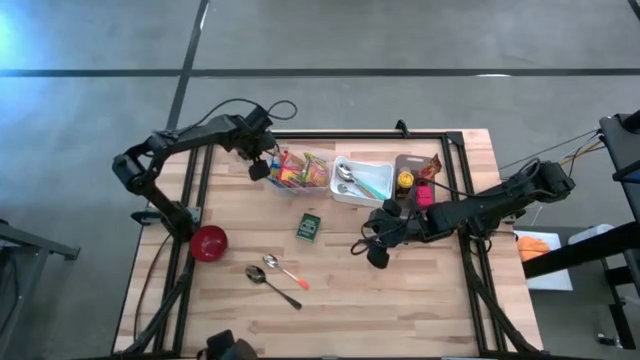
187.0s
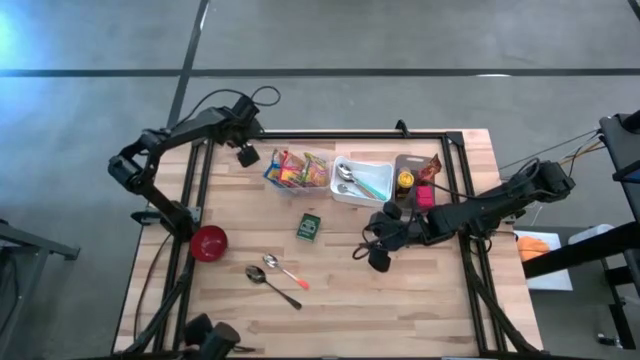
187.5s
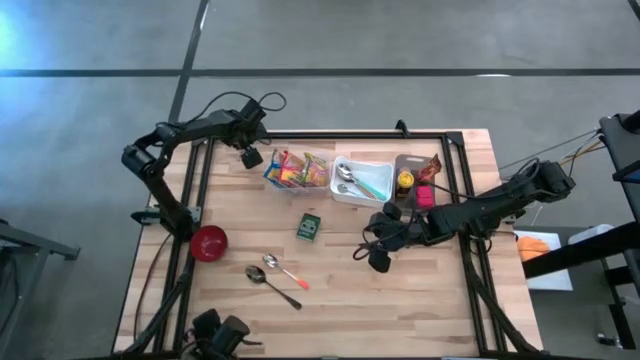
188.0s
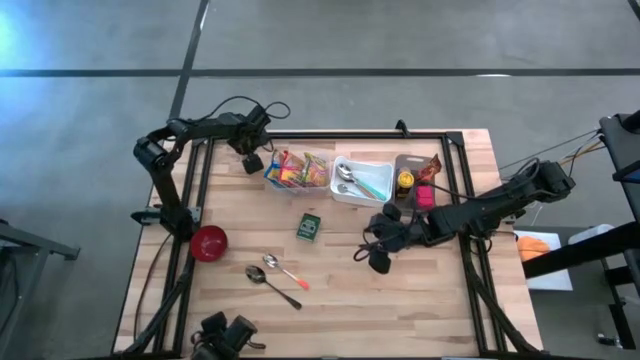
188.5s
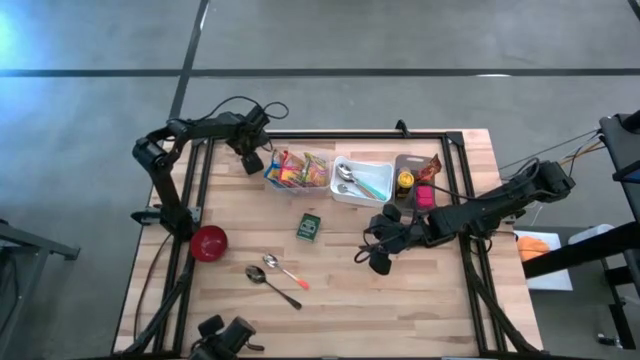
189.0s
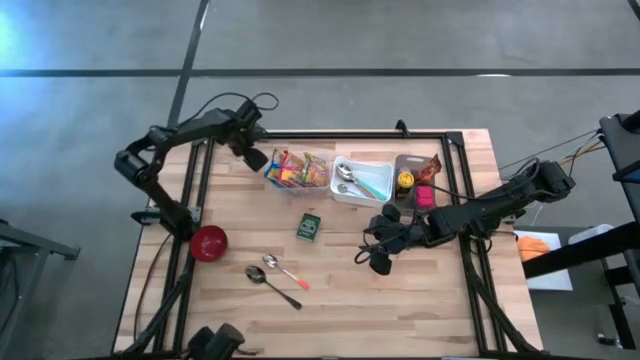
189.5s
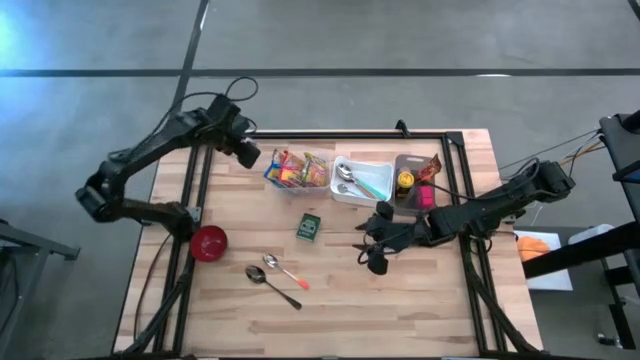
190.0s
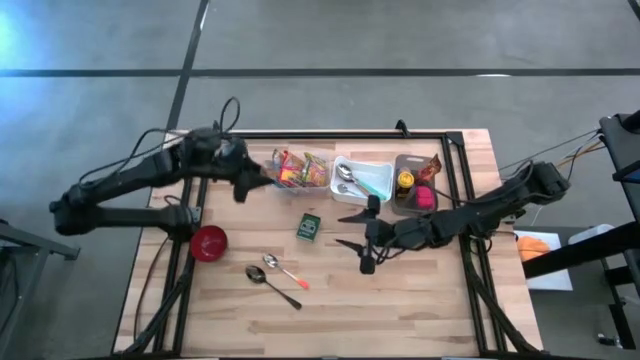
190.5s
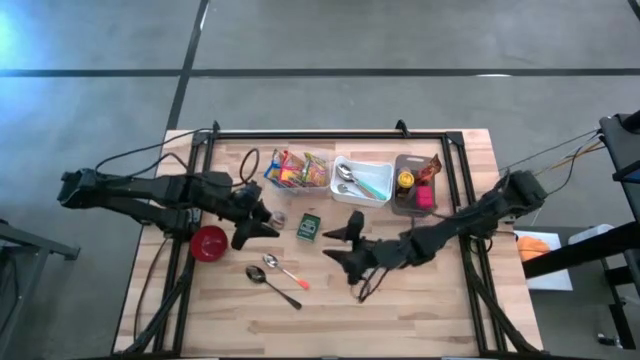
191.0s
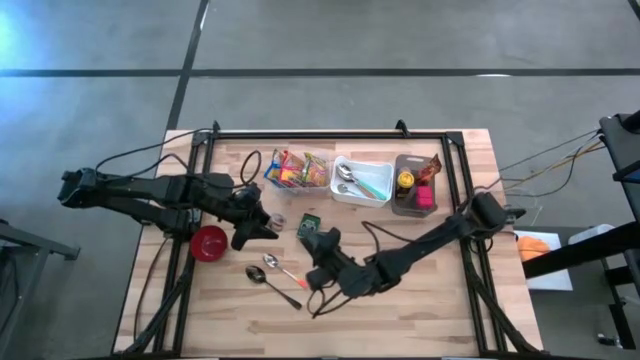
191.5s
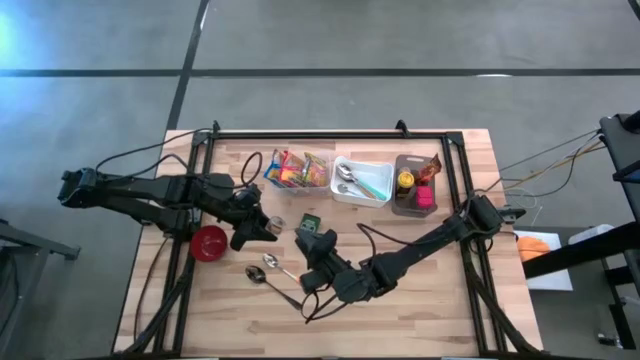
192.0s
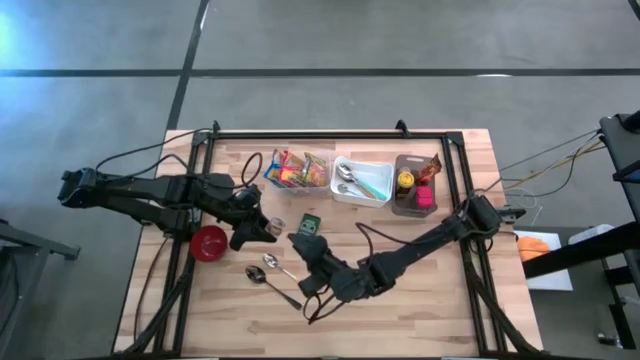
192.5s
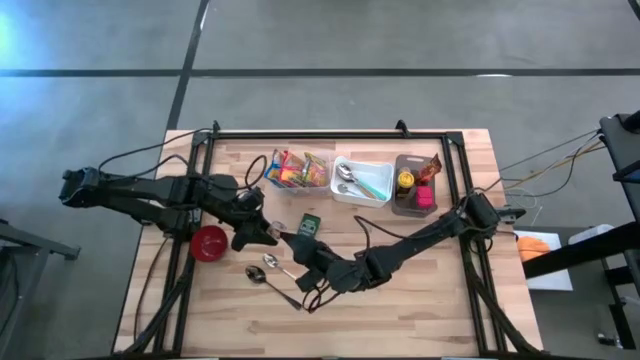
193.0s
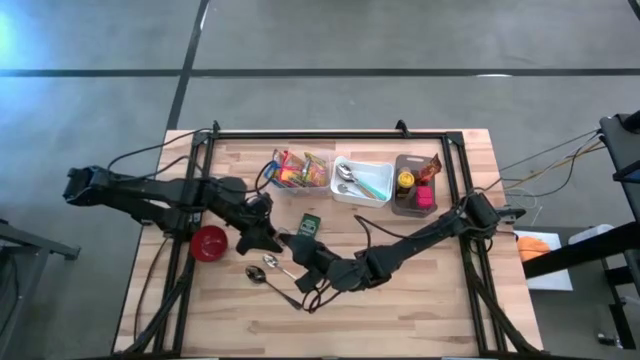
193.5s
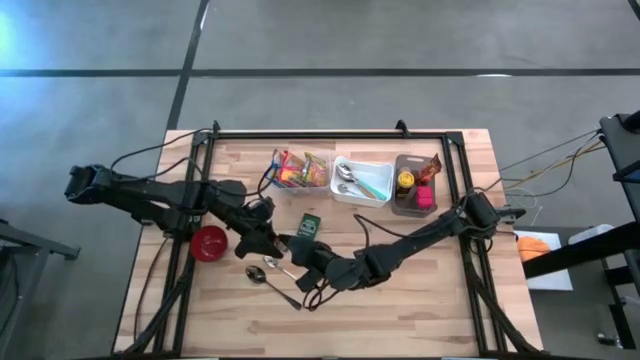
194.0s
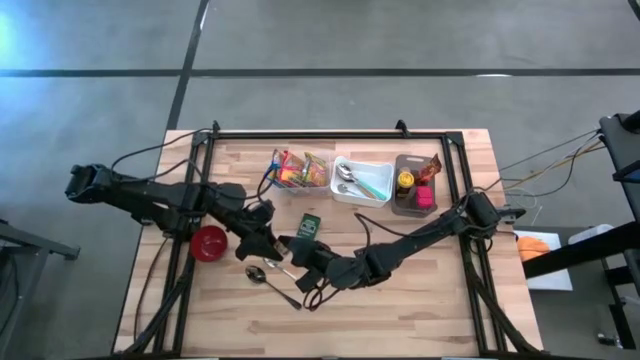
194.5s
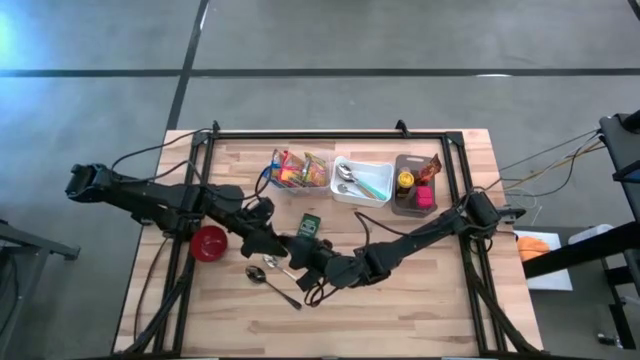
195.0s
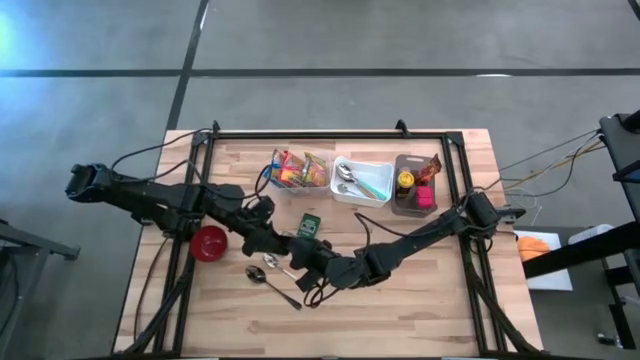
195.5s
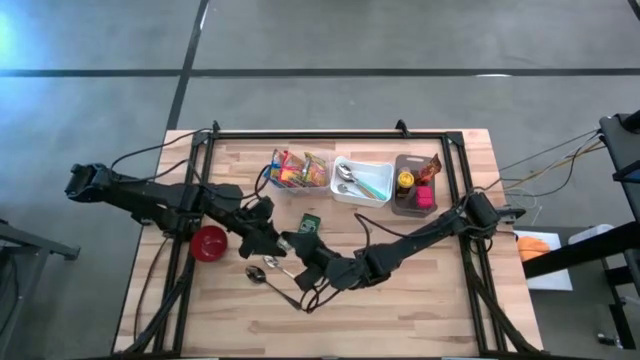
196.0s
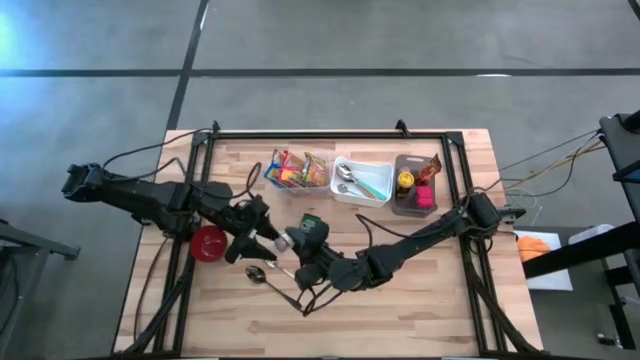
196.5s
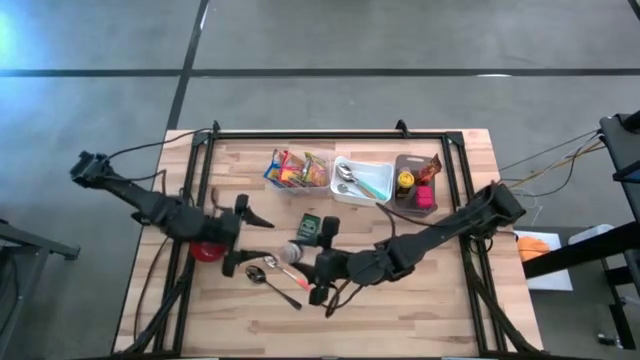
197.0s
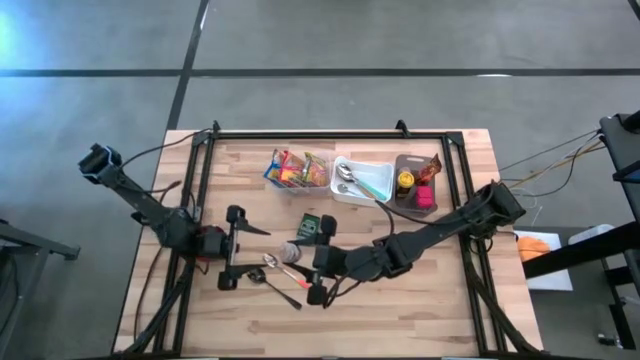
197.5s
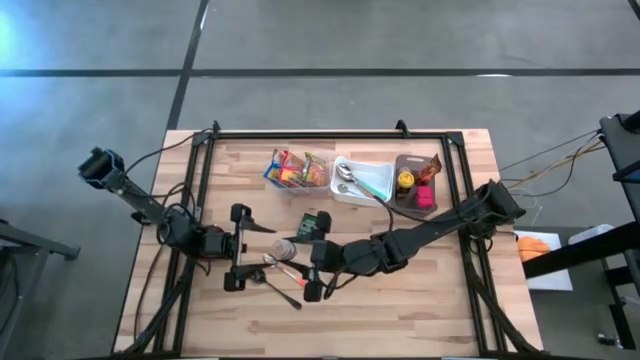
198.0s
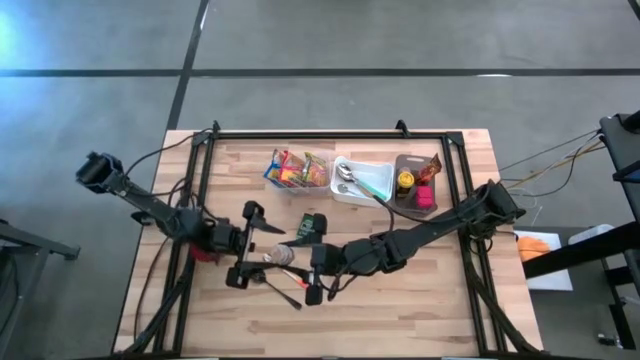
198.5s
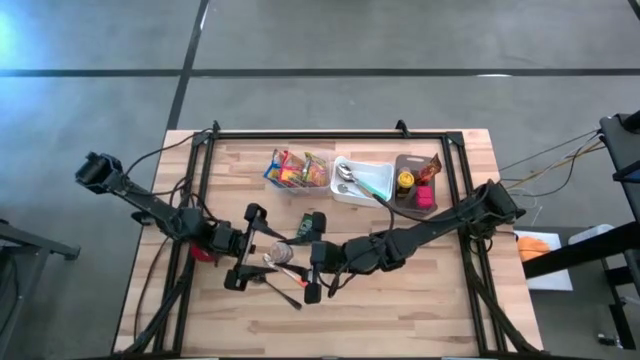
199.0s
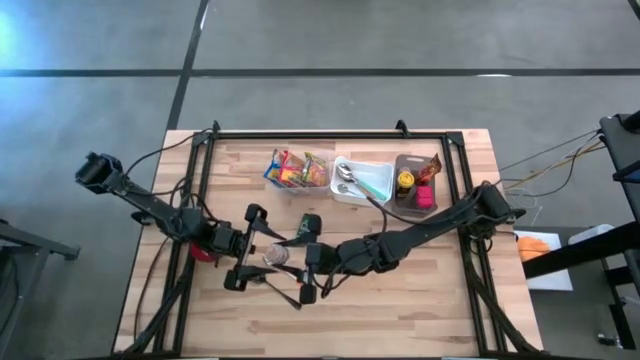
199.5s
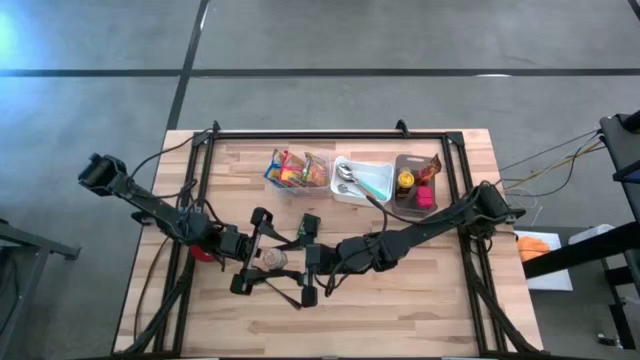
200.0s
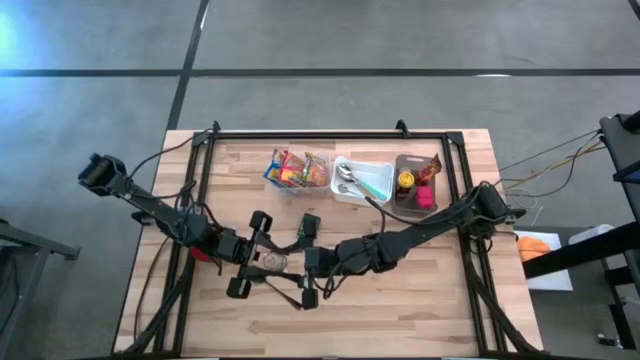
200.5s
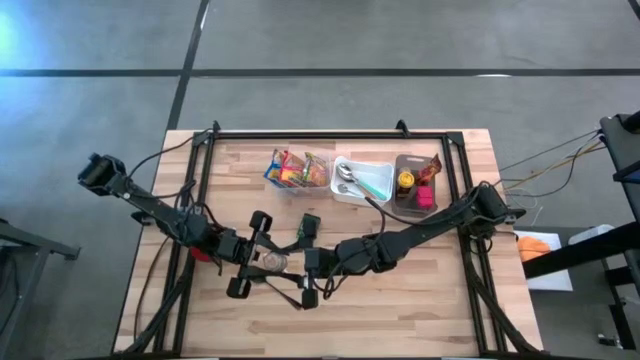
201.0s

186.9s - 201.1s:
Put the brown seasoning bottle into the black bin
